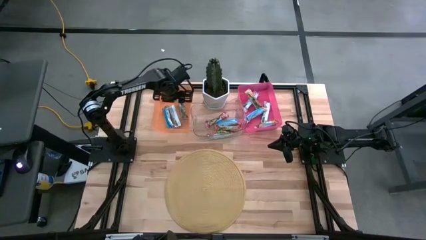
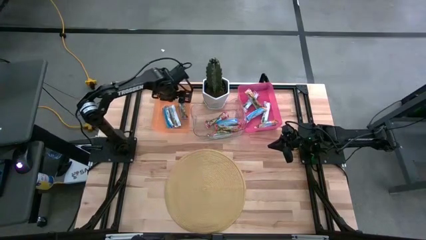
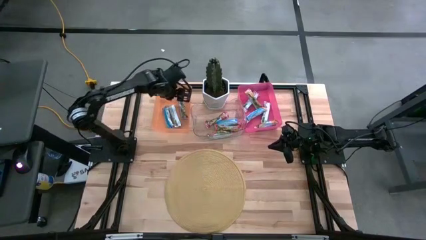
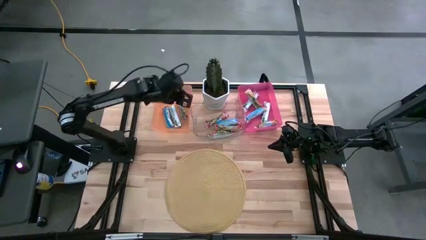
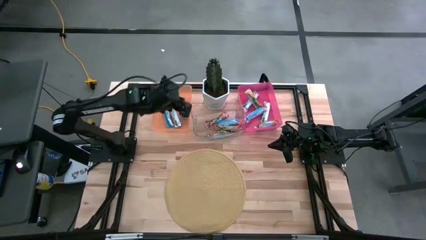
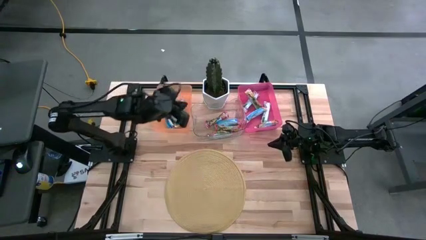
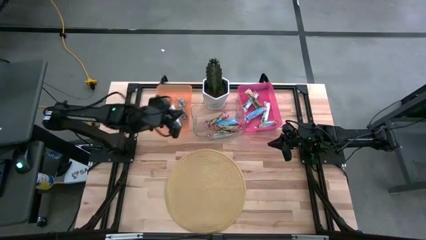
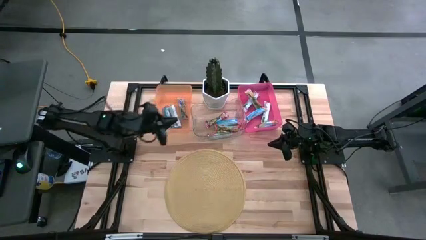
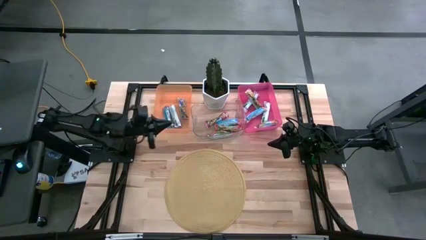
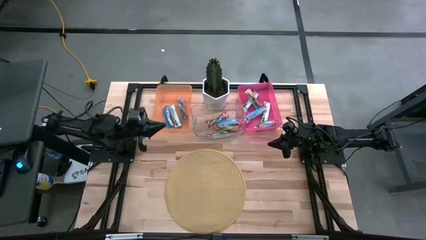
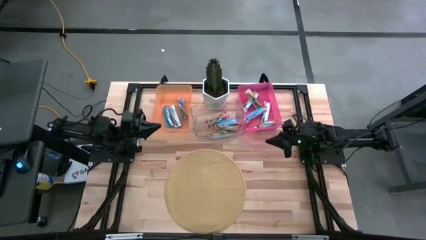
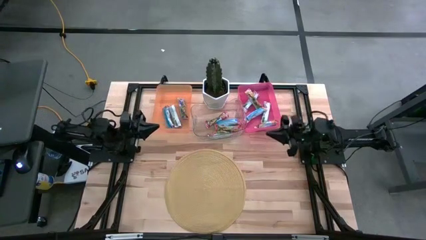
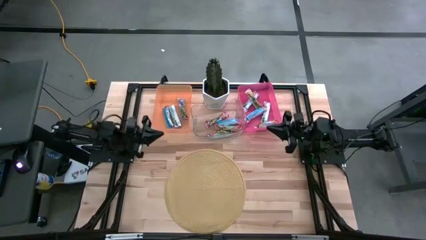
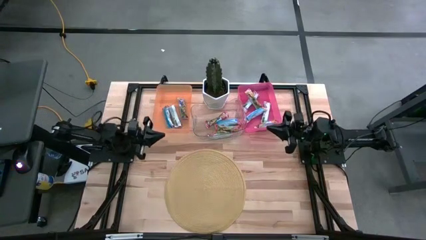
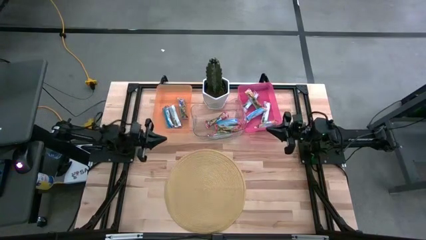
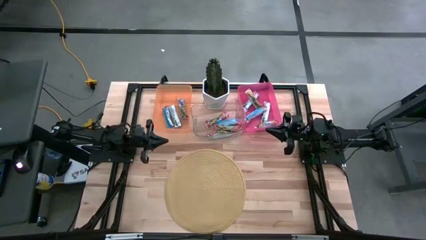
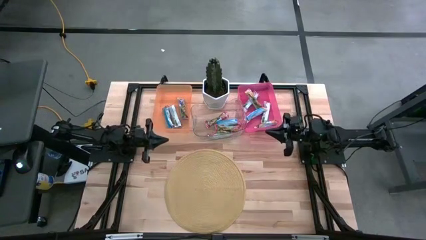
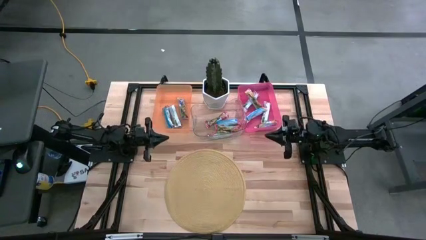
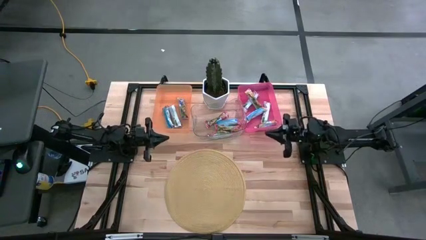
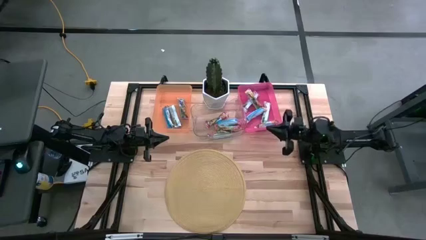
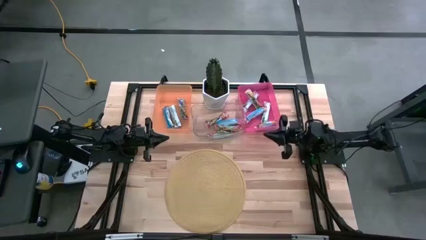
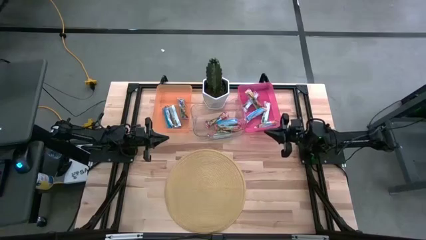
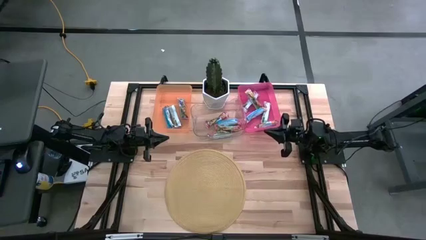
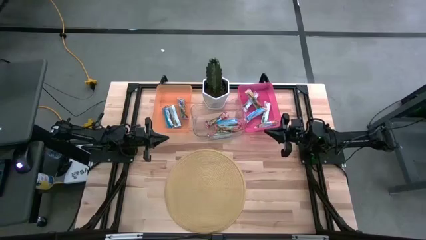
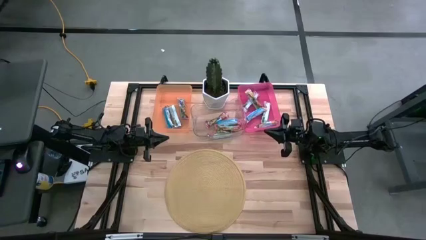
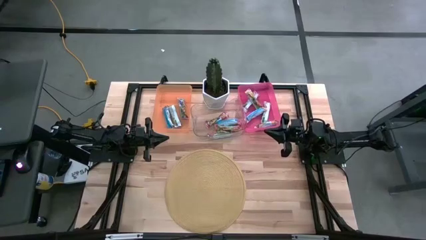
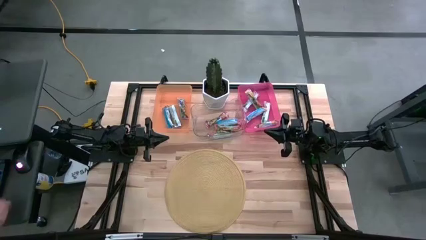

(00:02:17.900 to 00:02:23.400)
Task: Pick and place Granola Bars by type
Return to Home Position

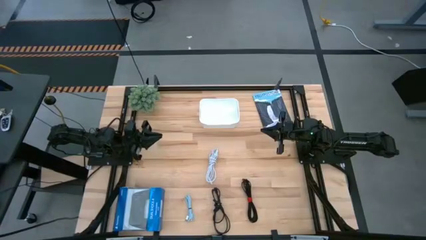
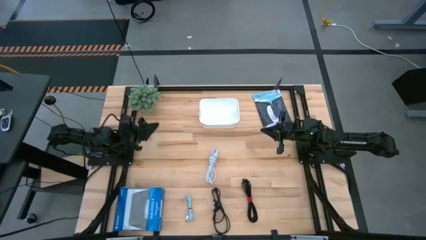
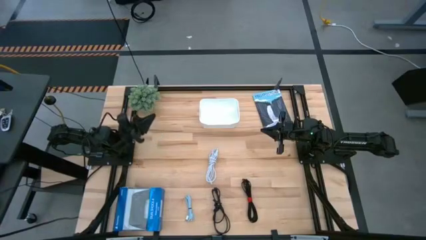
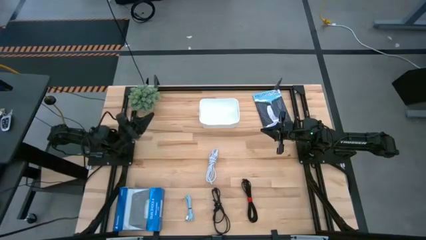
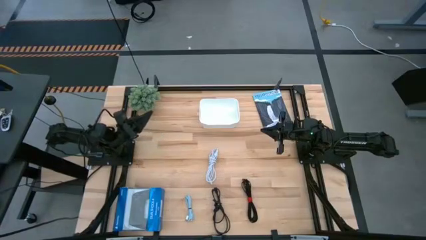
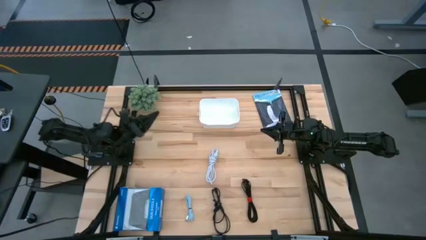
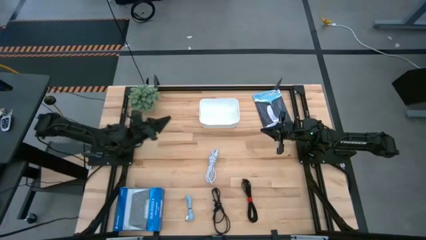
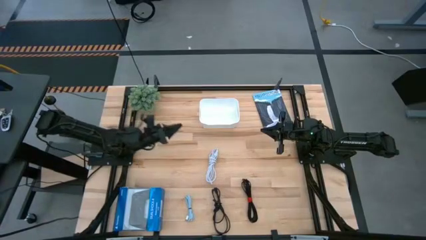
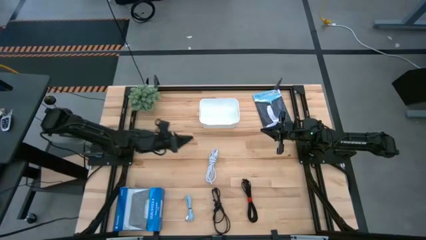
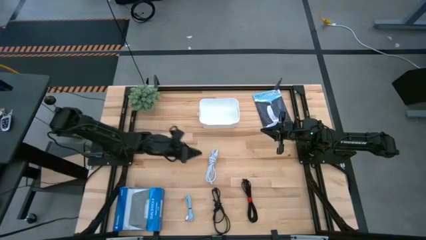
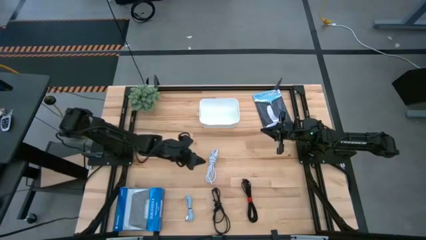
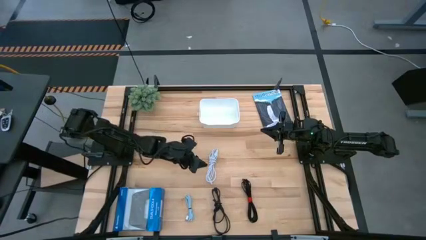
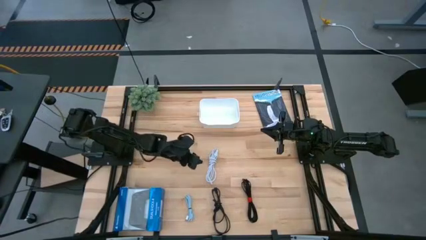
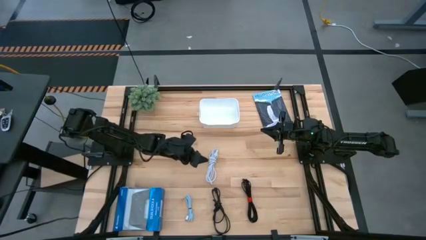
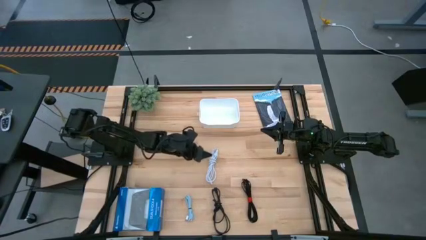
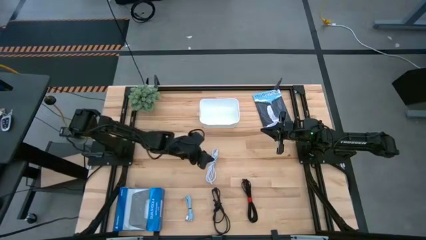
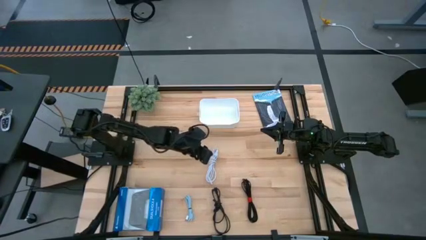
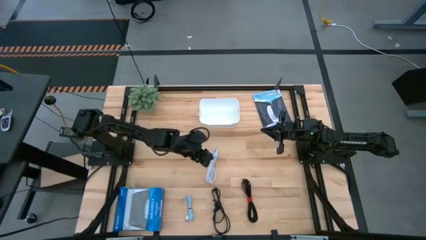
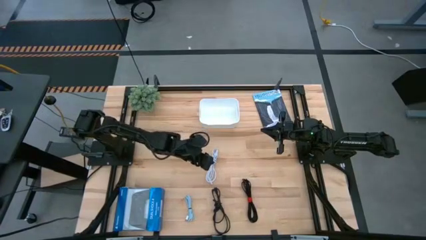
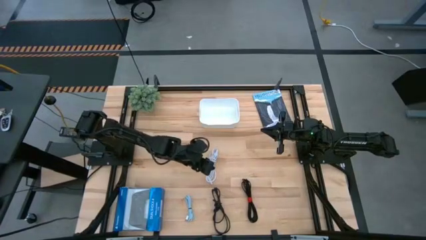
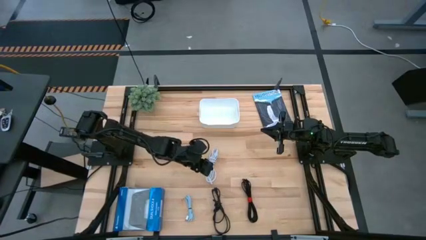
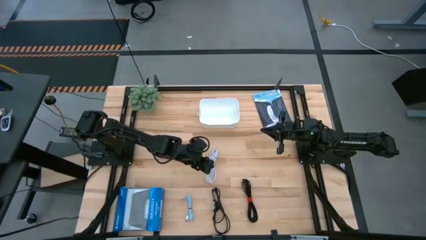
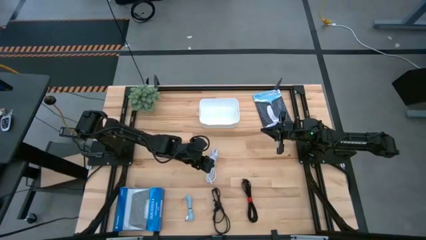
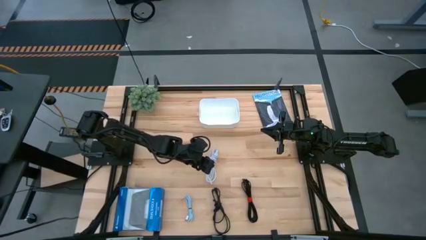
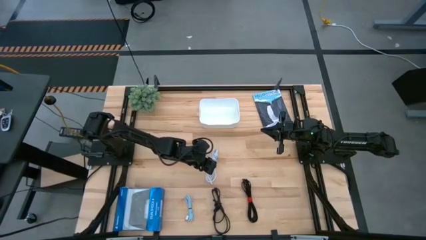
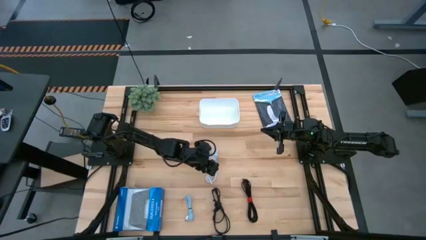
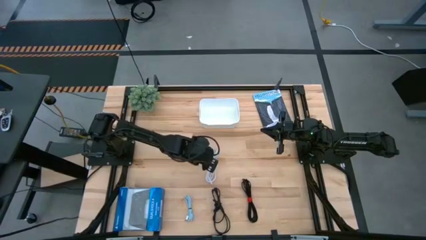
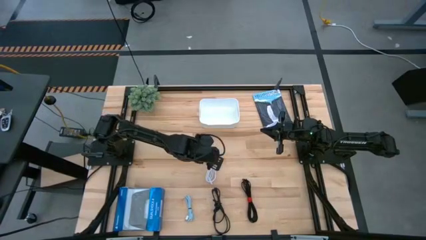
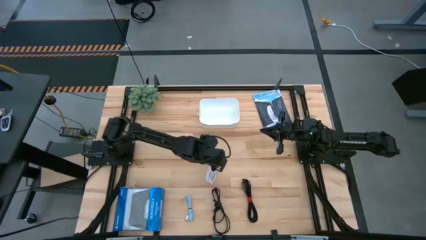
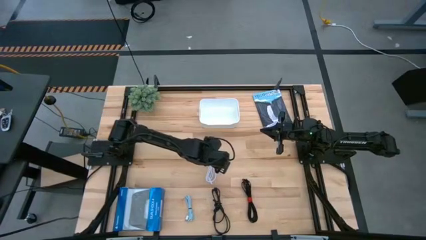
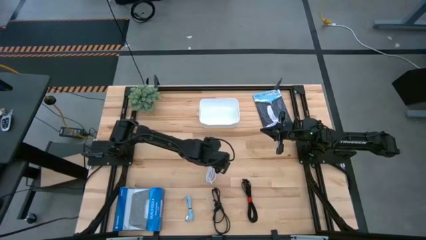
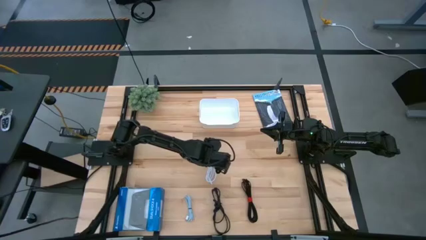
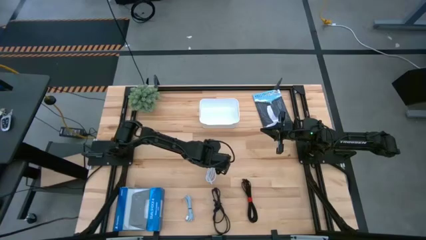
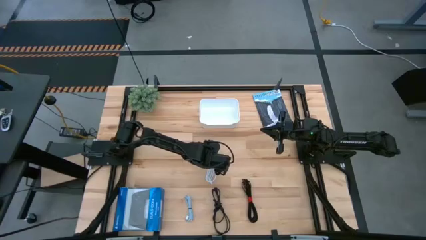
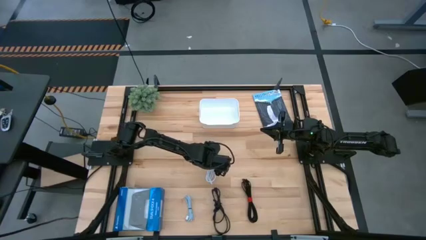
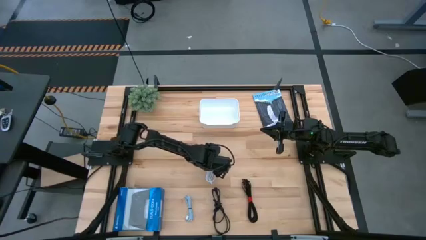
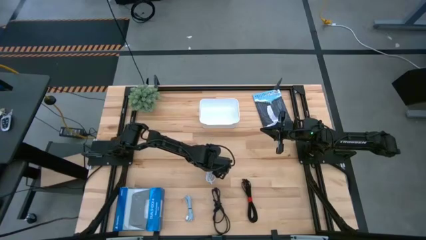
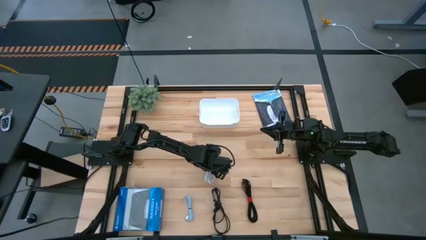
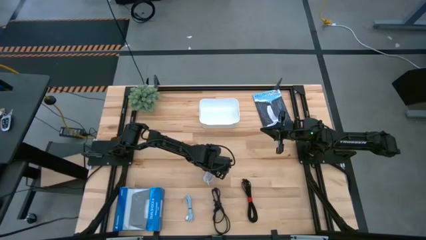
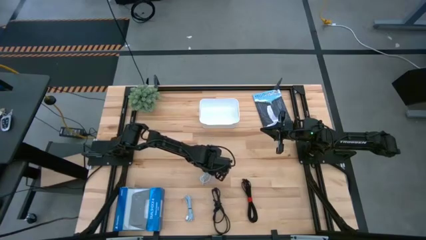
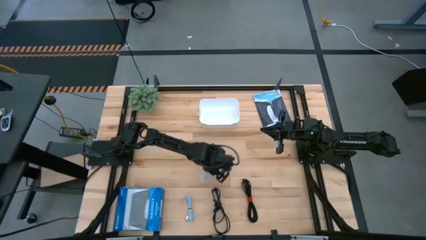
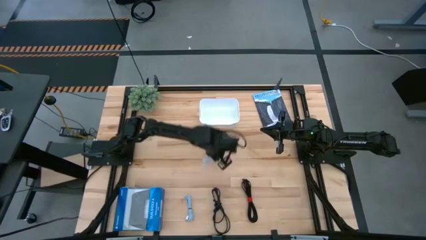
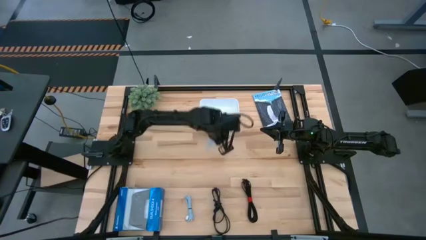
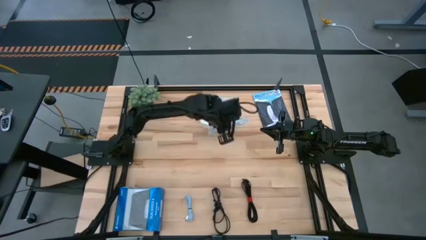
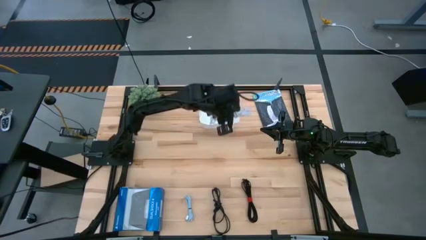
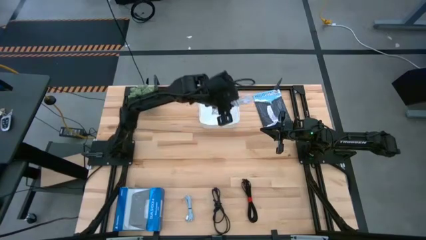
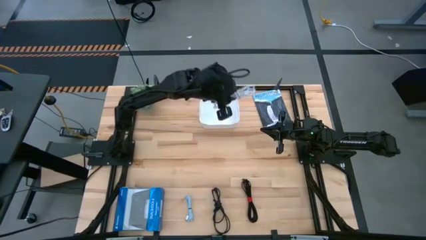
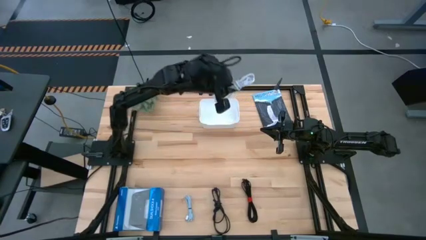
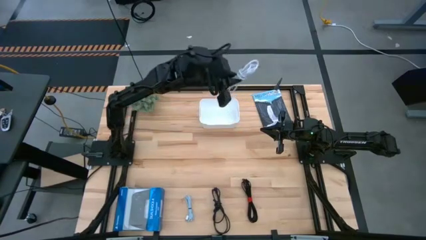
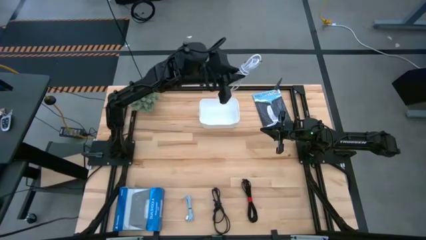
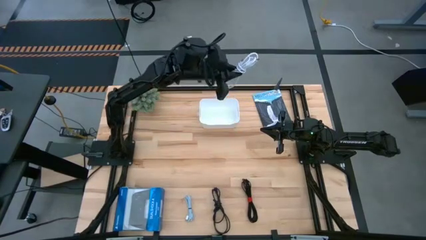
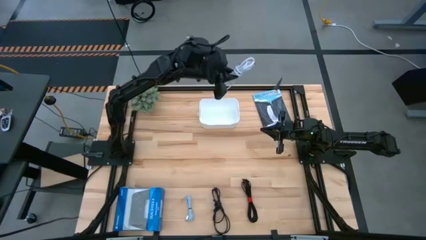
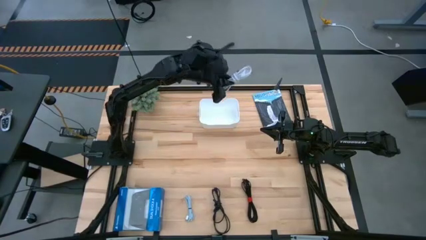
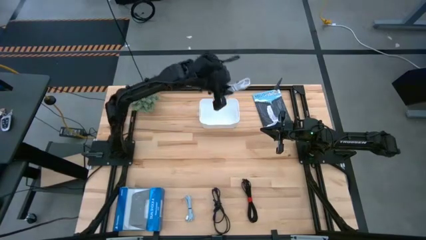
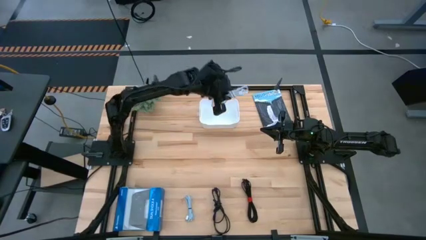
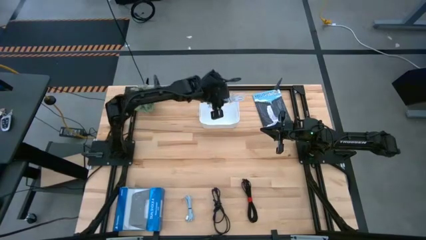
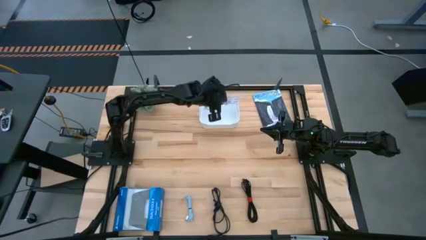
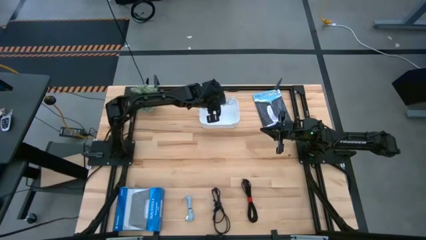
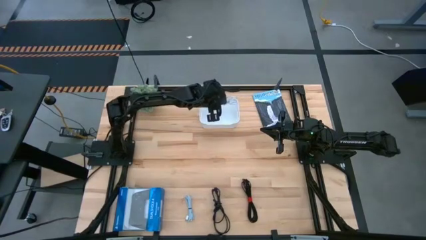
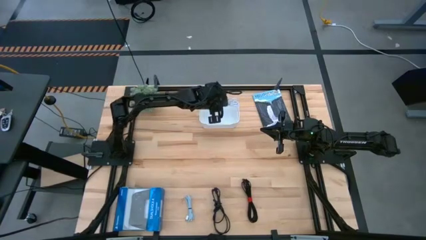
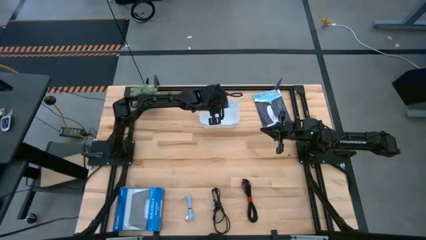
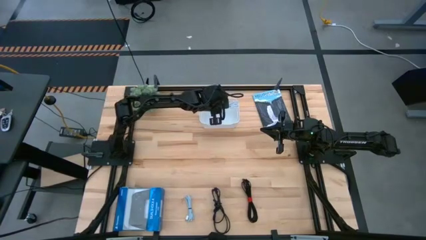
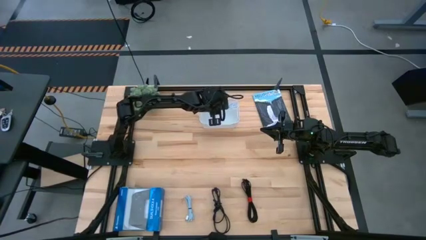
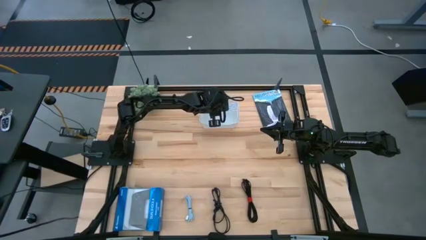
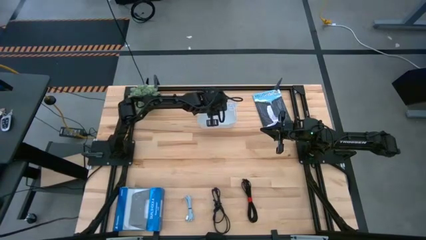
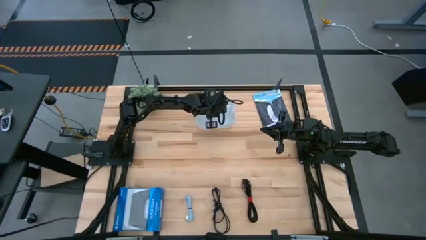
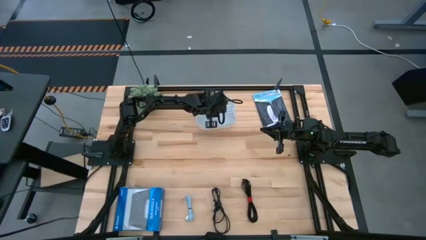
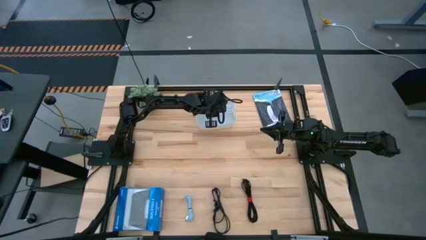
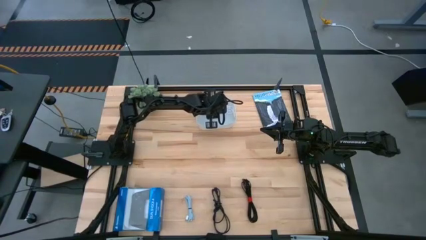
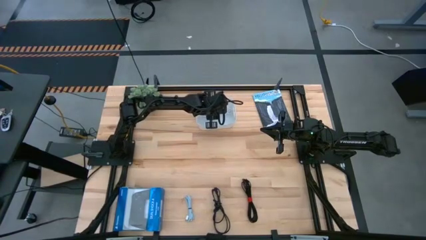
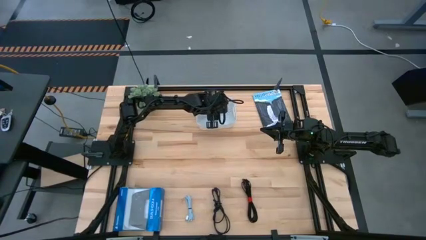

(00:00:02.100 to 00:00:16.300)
Task: Pick and place USB-C Cables
Put the white charger cable into the white bin
